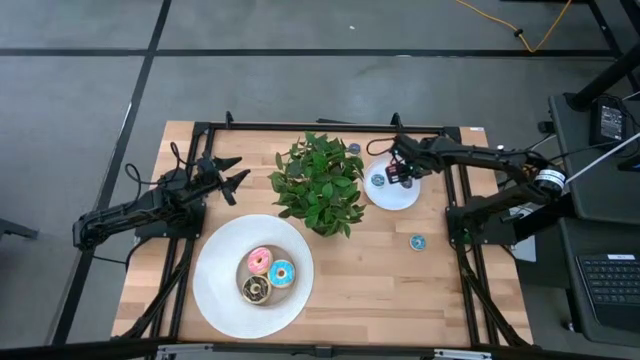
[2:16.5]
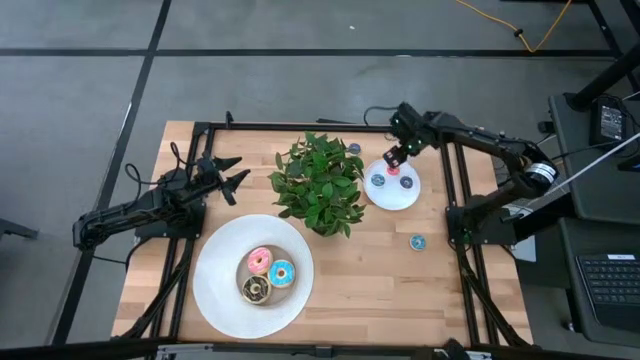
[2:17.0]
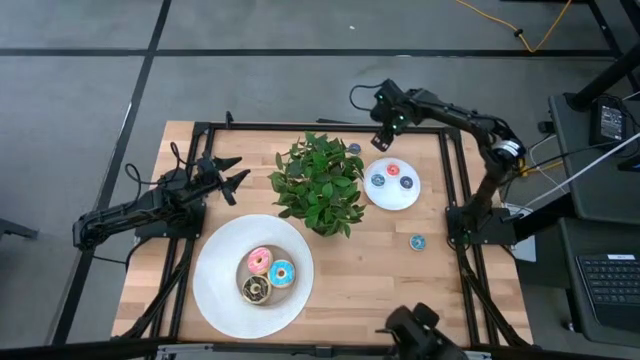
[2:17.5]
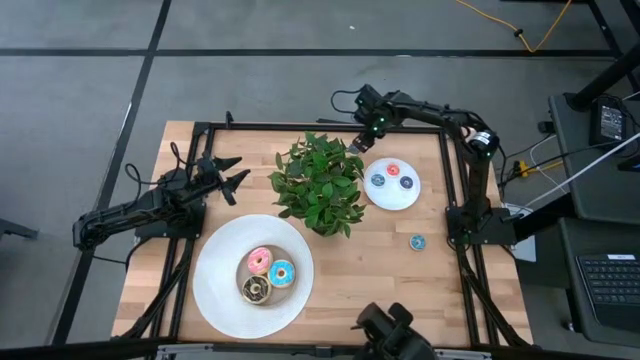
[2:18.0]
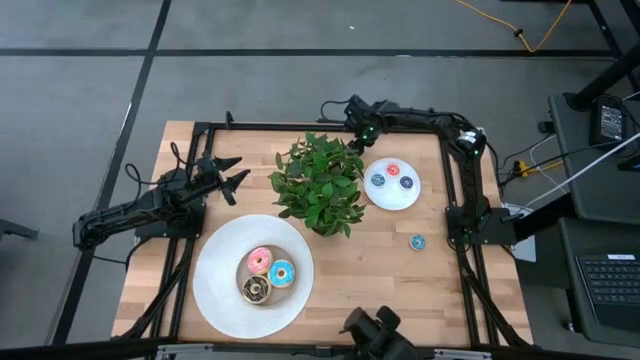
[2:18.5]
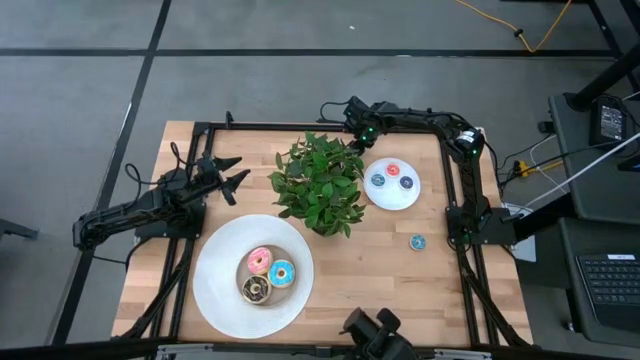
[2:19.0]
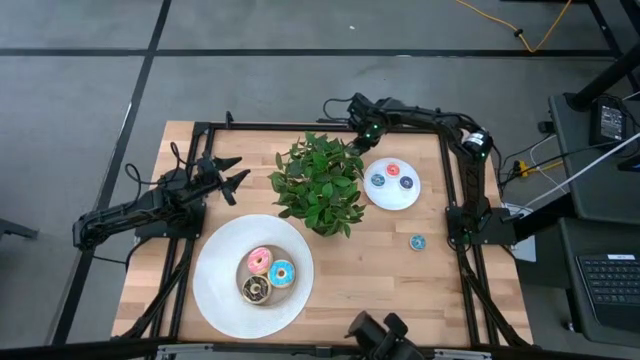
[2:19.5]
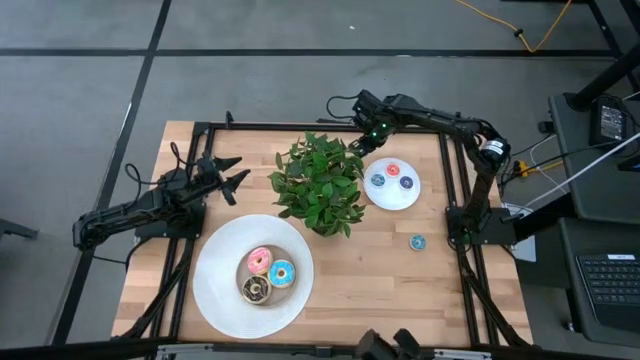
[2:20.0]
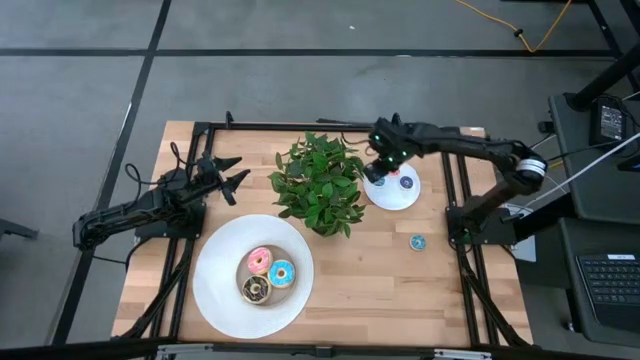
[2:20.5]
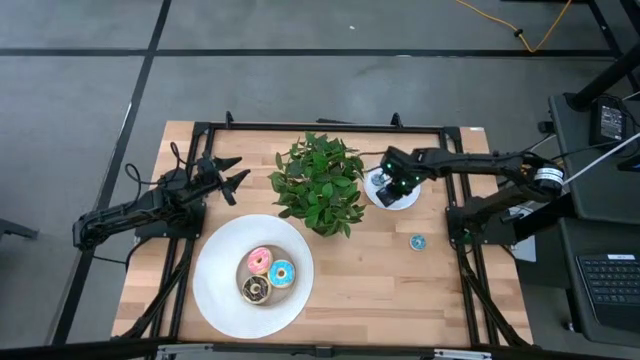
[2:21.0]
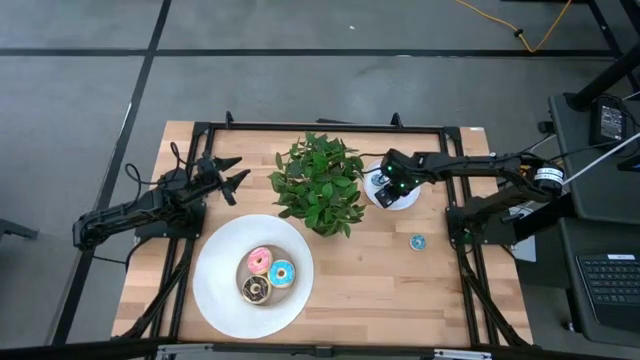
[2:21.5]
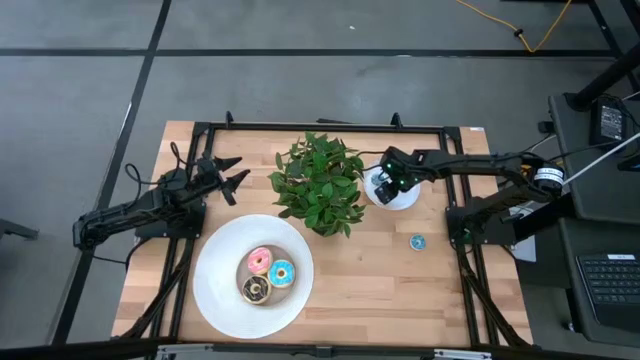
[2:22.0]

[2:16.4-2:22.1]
Task: Pick & Place donuts
Put the small blue donut on the white plate

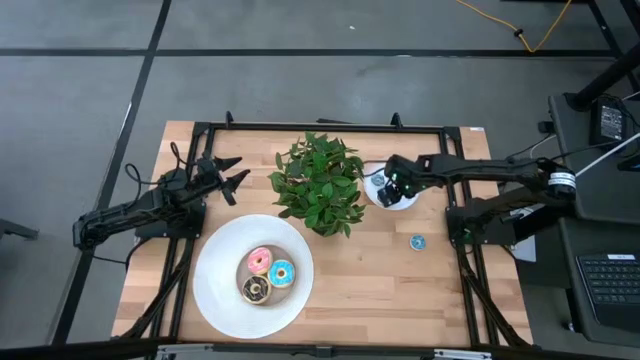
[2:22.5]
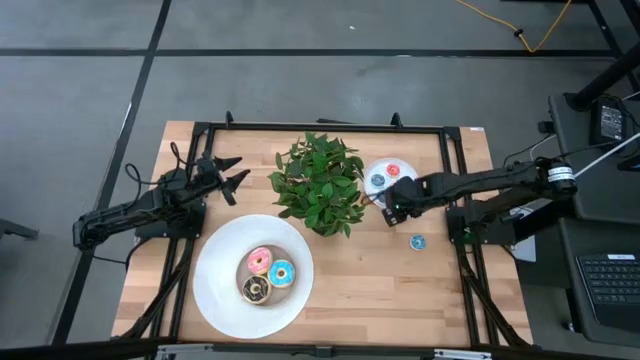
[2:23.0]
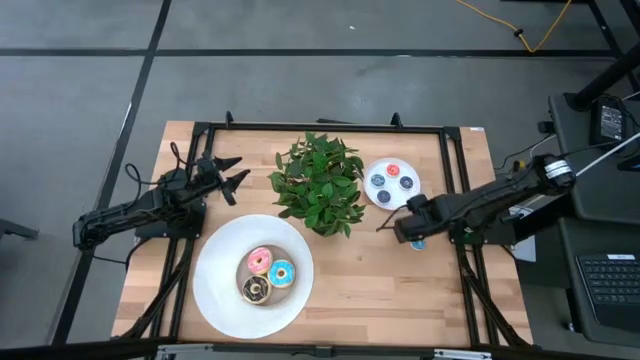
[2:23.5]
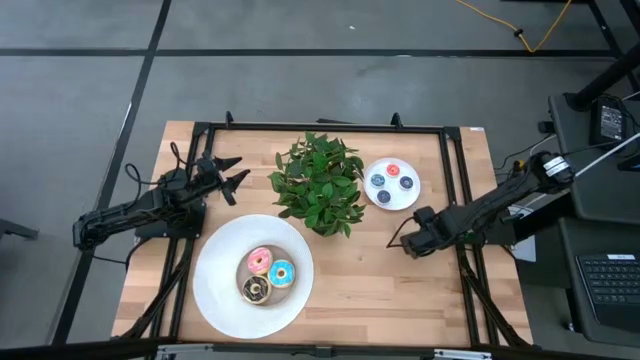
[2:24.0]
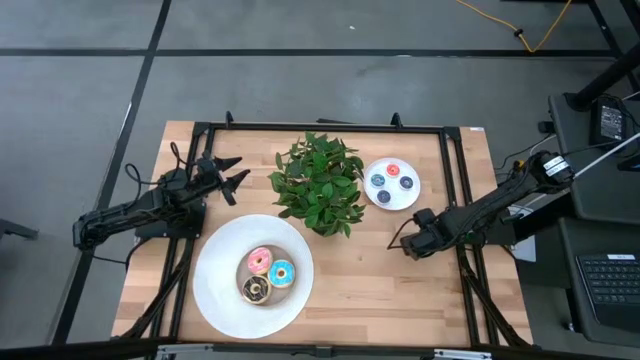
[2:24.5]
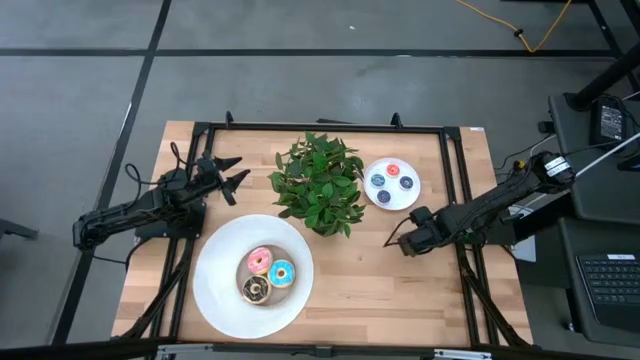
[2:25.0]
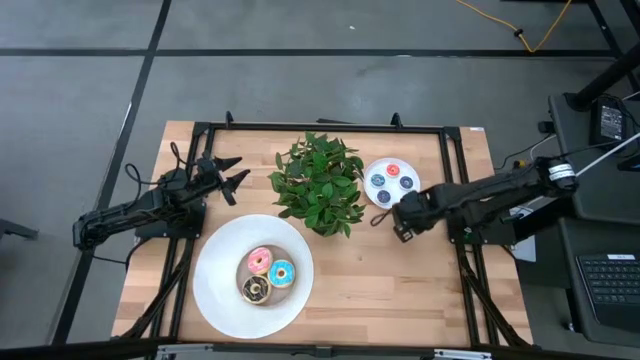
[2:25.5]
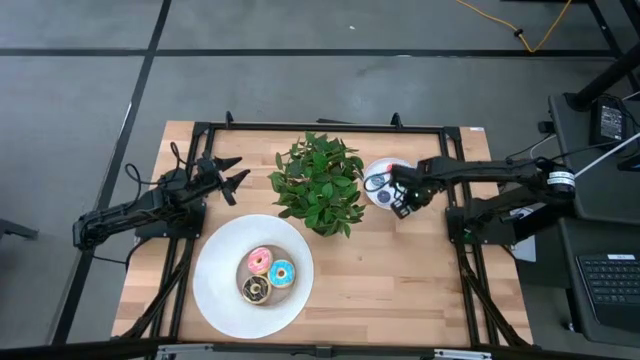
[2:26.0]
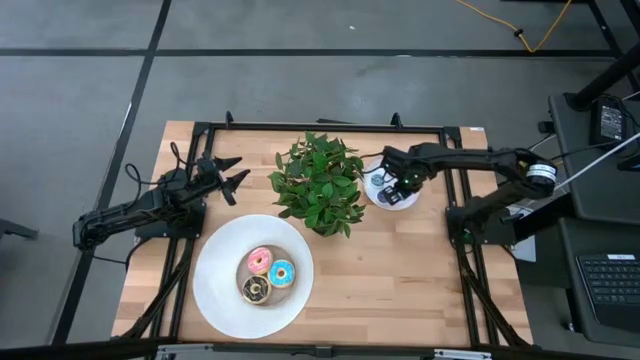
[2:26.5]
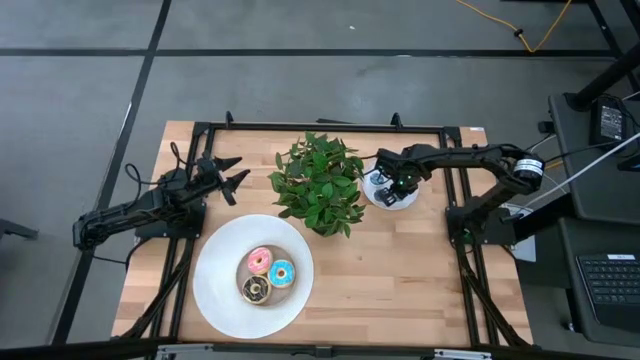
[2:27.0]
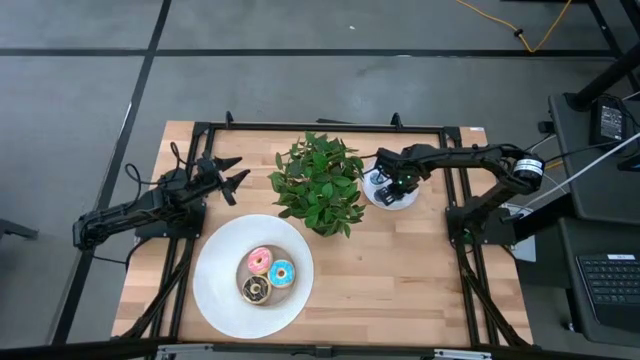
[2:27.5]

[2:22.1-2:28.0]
Put the small light blue donut on the white plate

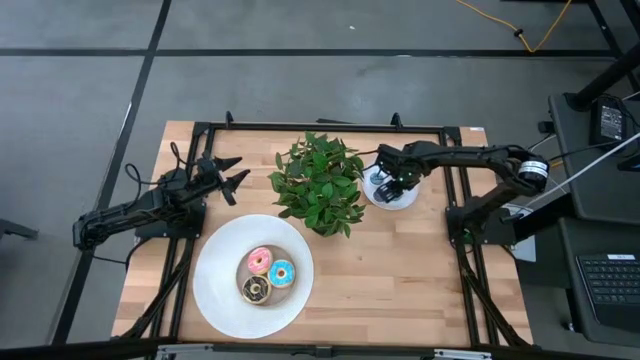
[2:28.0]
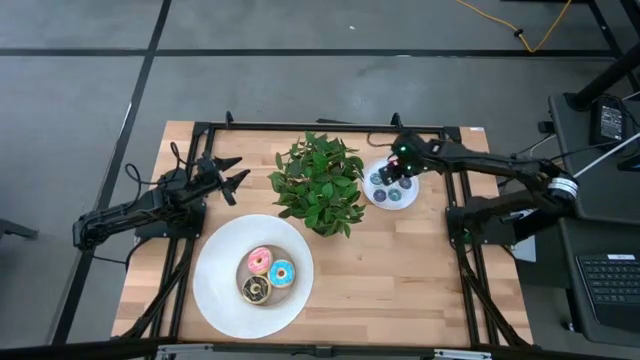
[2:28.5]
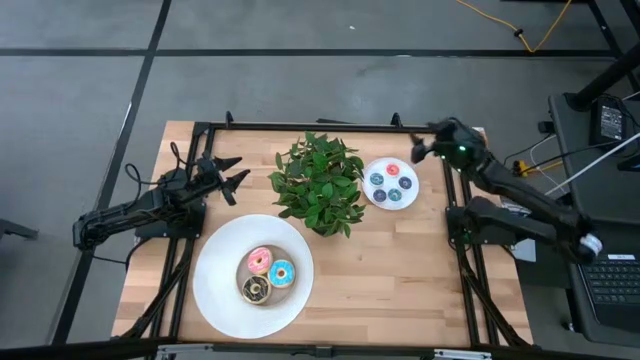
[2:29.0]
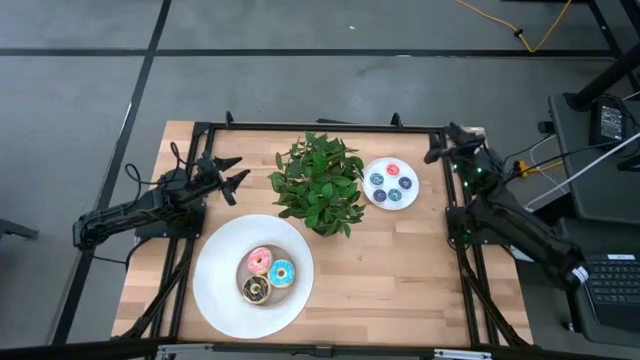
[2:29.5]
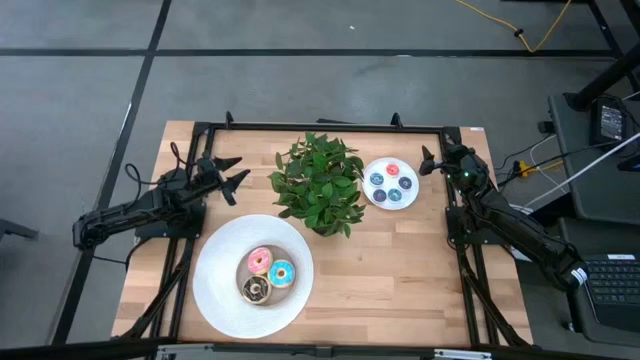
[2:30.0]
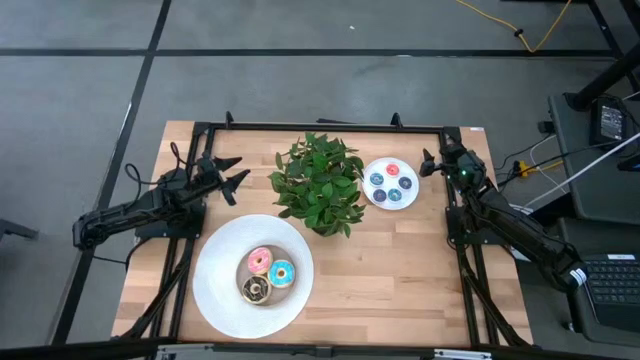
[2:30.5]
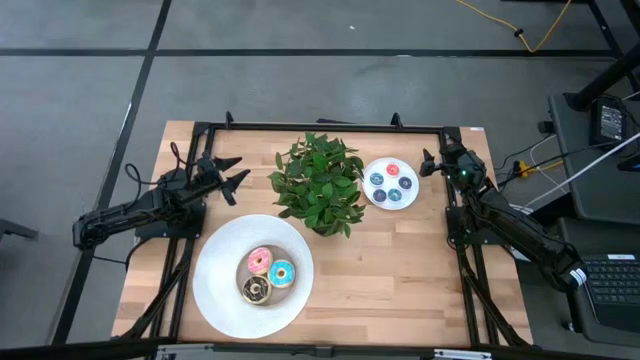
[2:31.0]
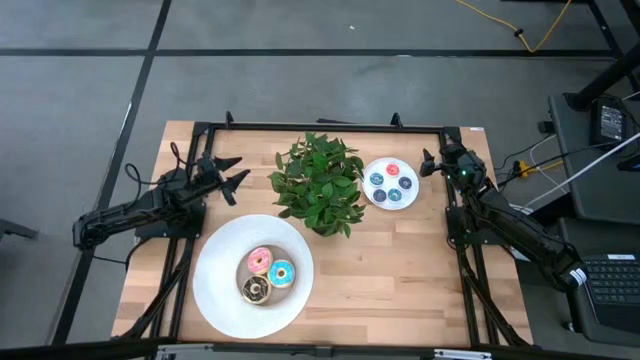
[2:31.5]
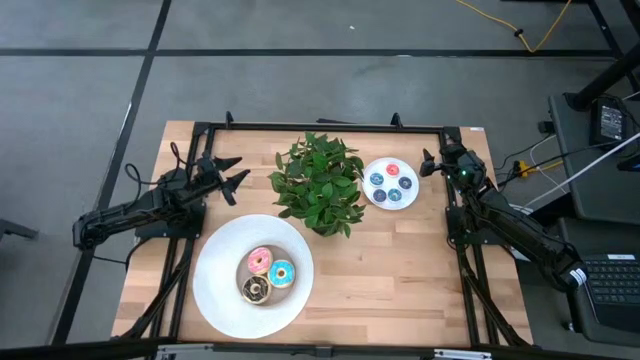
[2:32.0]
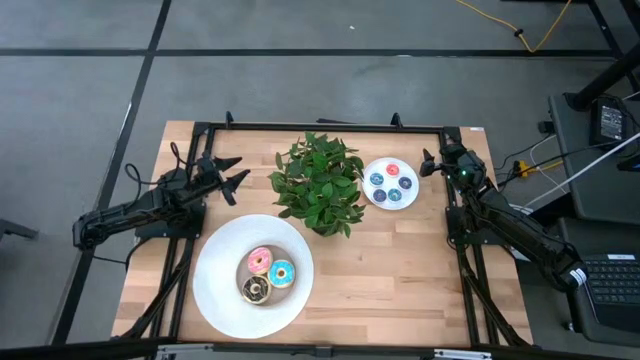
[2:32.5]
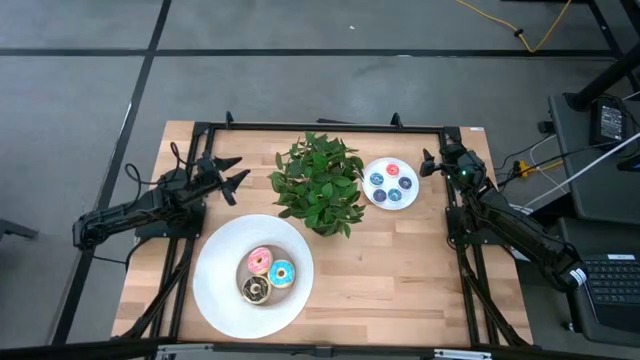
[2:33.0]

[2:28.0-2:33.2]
Return to Home Position
